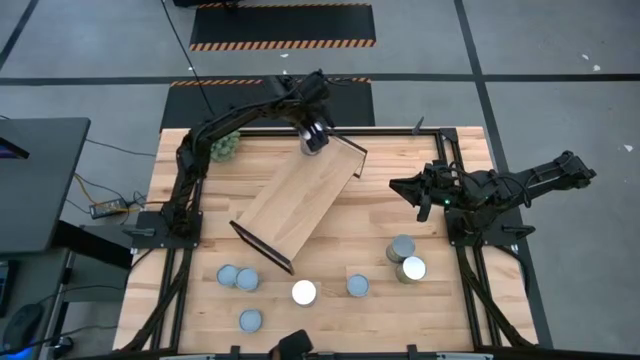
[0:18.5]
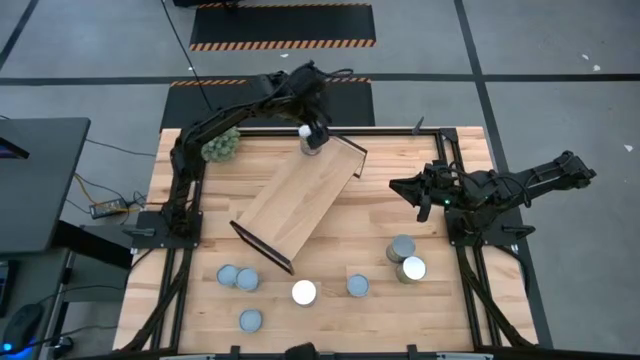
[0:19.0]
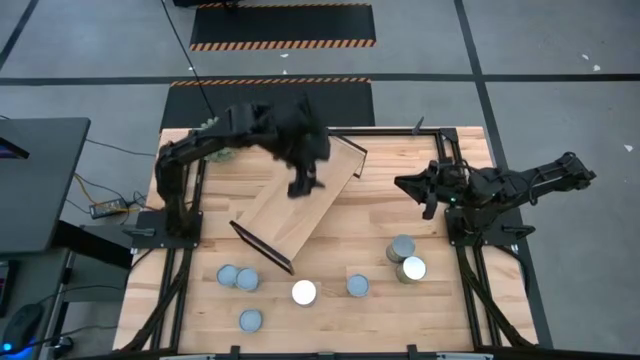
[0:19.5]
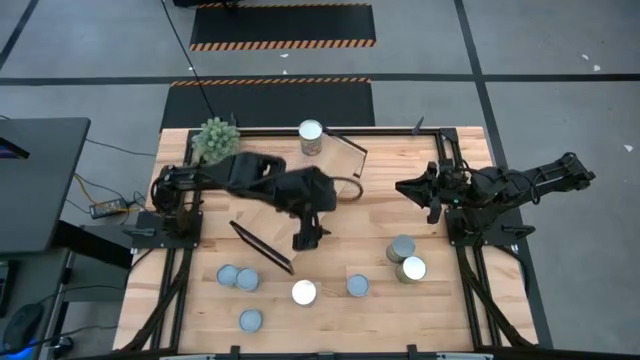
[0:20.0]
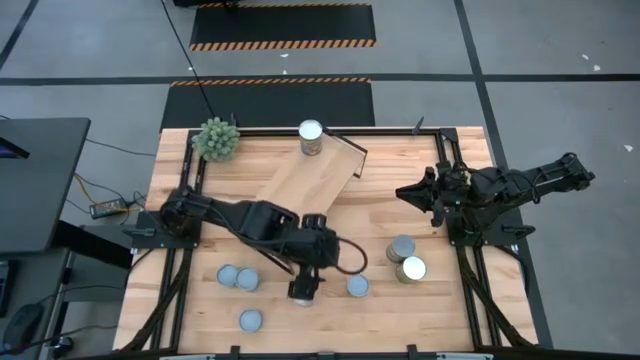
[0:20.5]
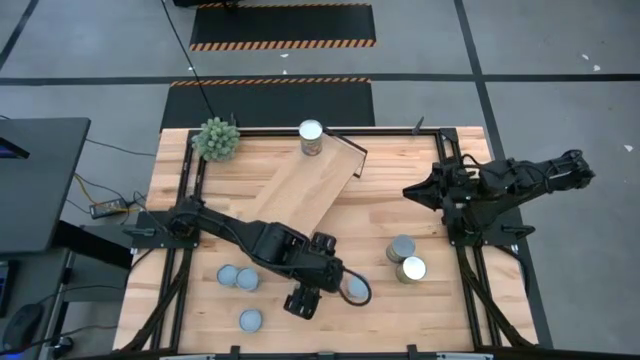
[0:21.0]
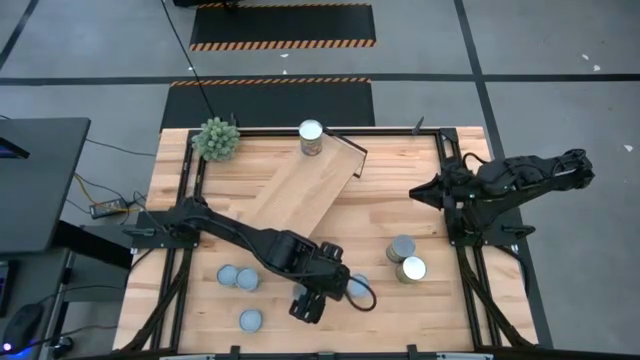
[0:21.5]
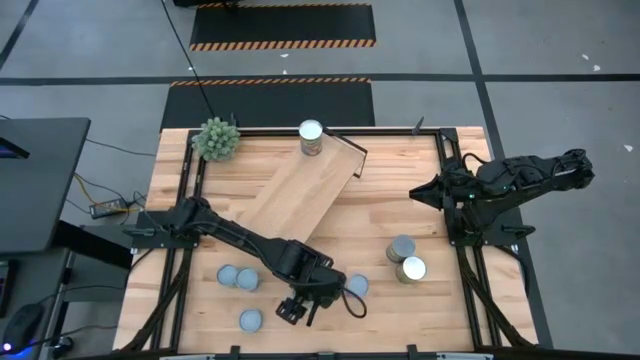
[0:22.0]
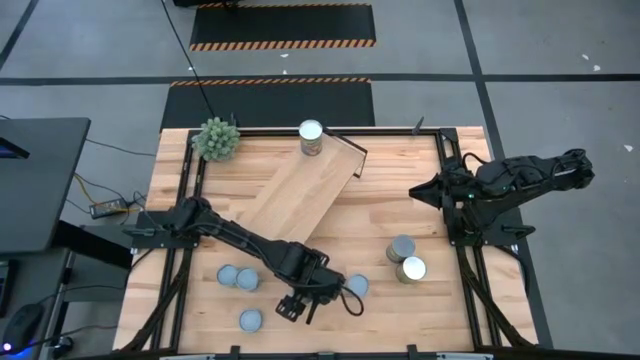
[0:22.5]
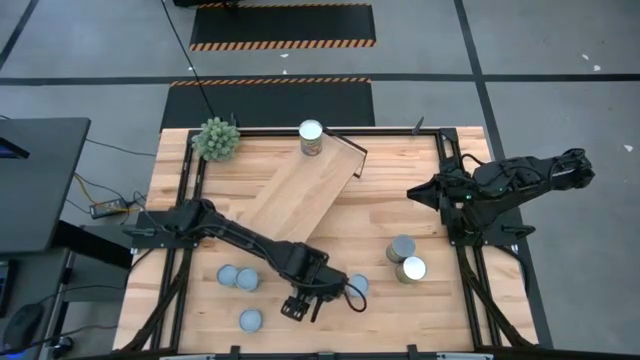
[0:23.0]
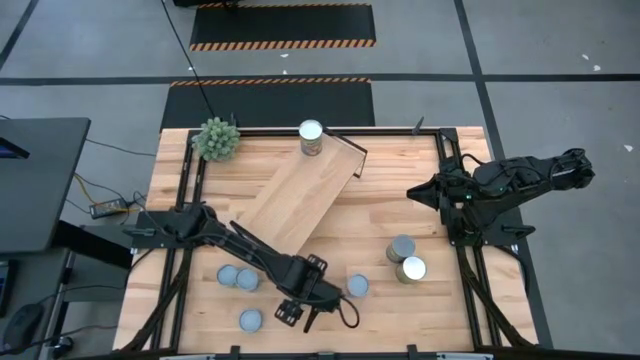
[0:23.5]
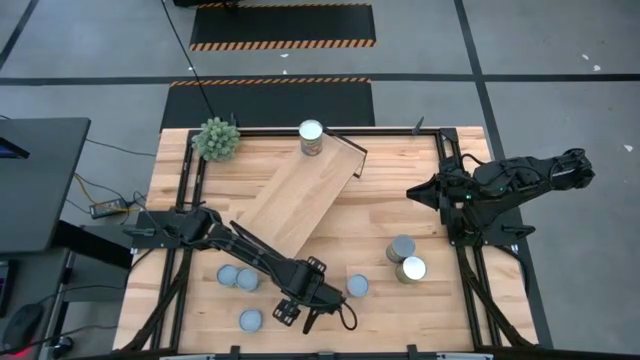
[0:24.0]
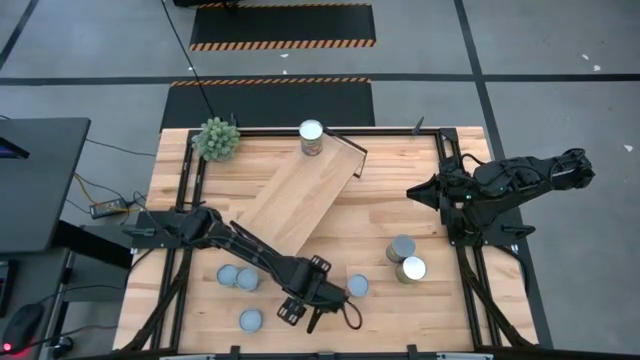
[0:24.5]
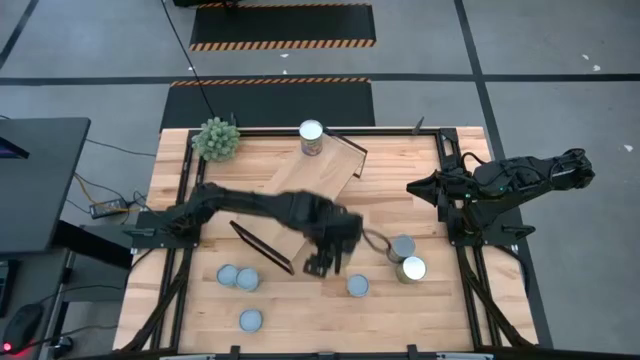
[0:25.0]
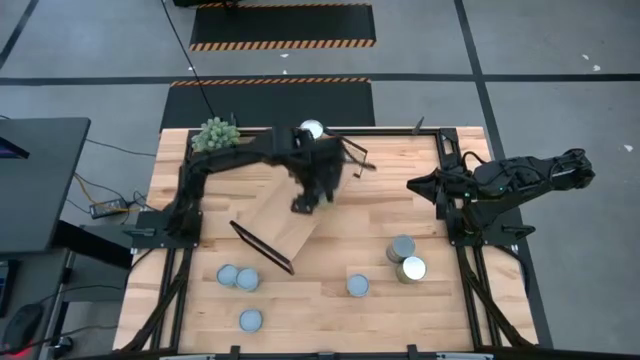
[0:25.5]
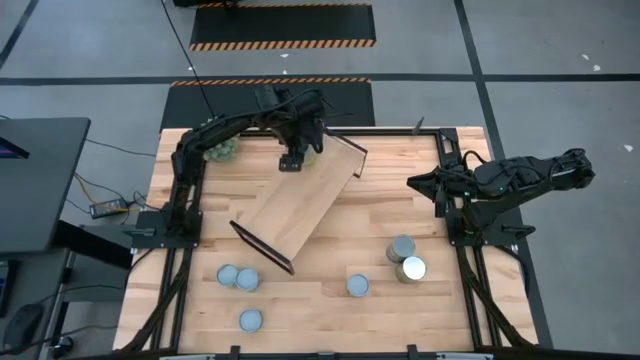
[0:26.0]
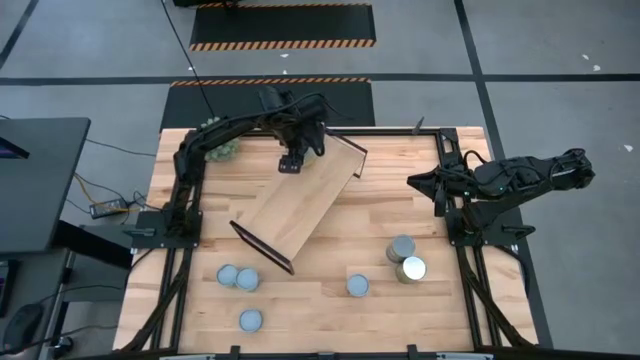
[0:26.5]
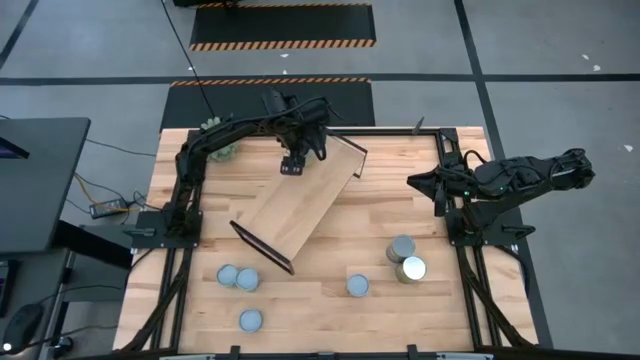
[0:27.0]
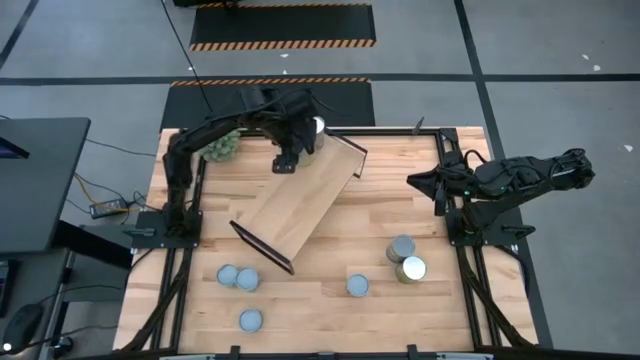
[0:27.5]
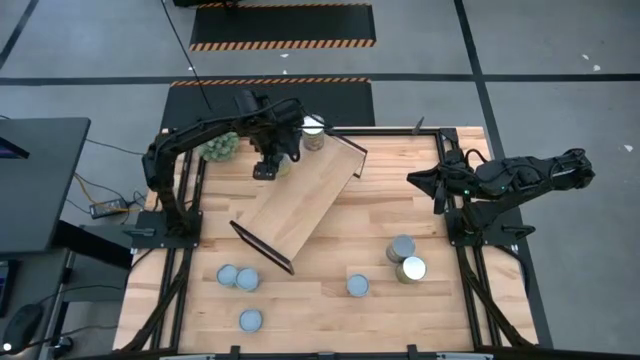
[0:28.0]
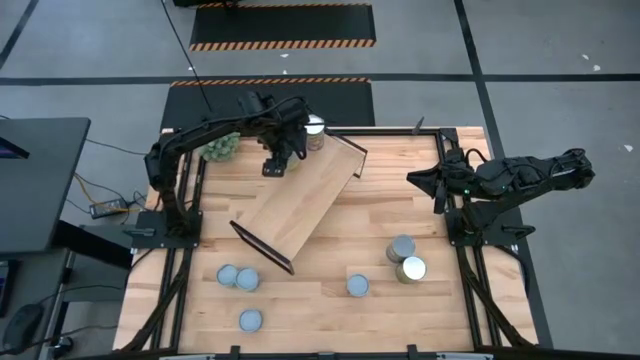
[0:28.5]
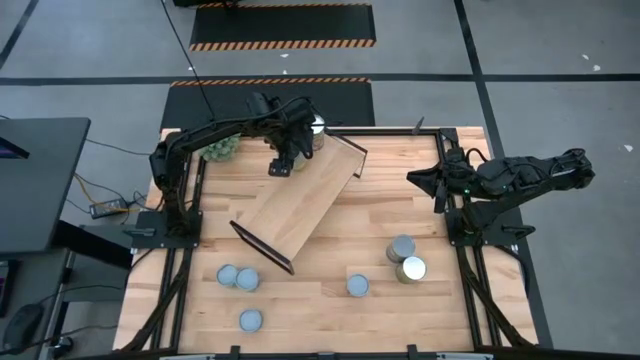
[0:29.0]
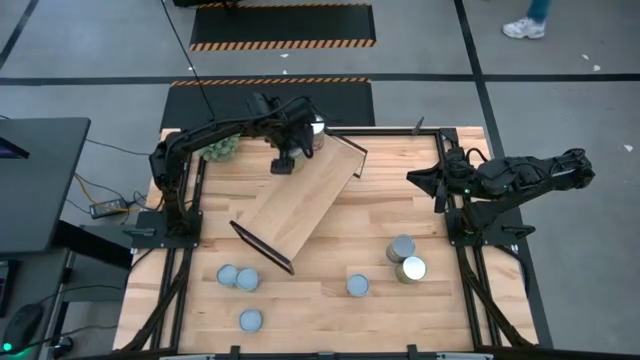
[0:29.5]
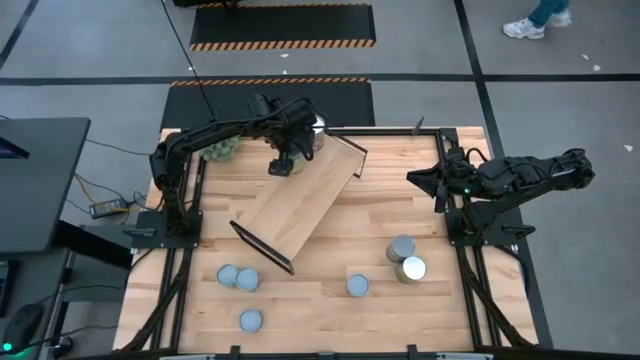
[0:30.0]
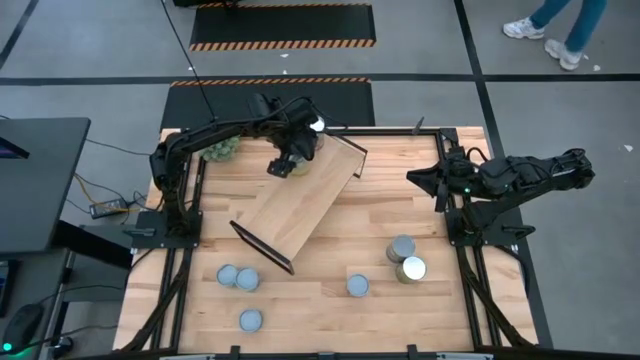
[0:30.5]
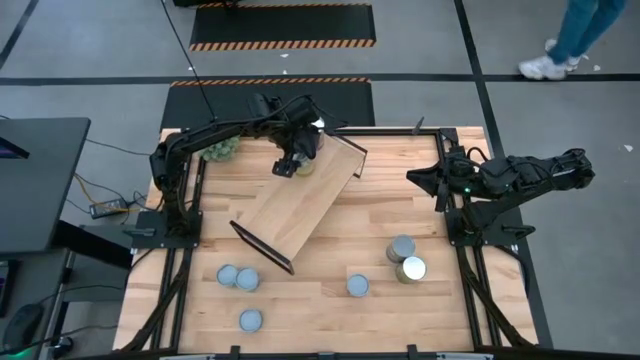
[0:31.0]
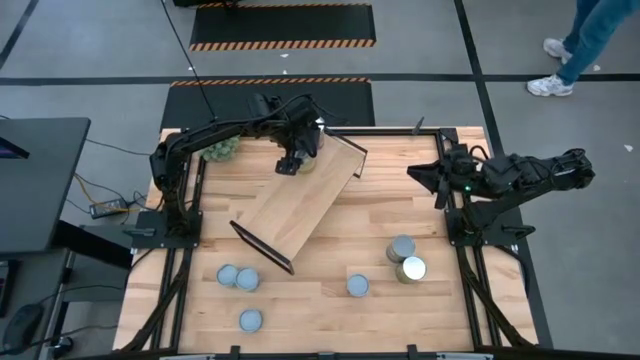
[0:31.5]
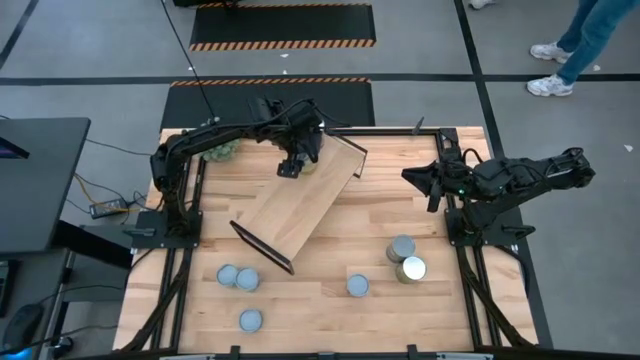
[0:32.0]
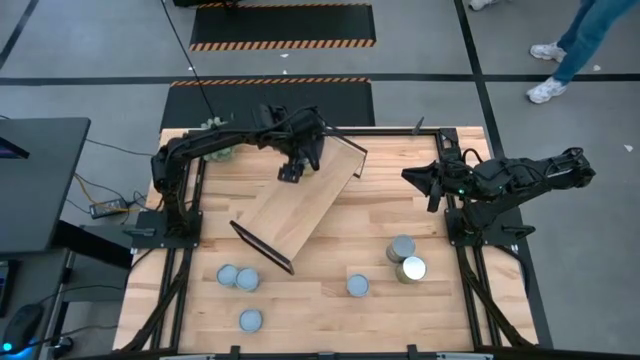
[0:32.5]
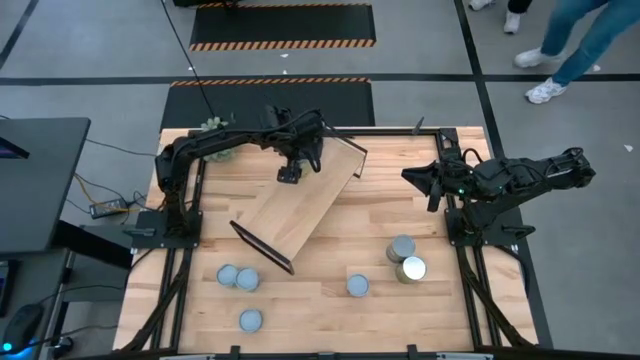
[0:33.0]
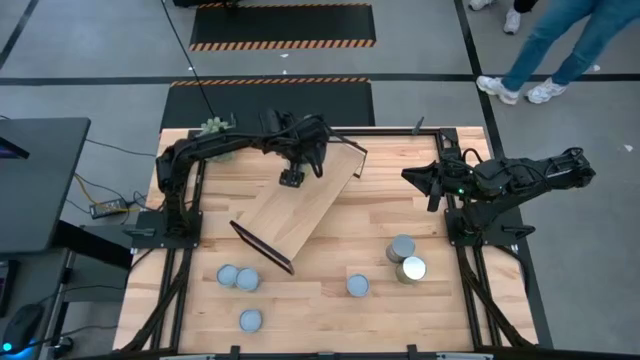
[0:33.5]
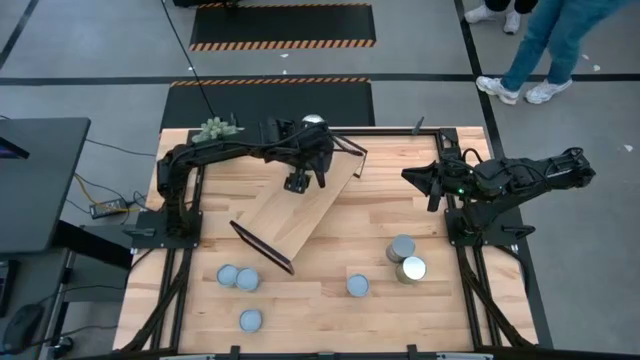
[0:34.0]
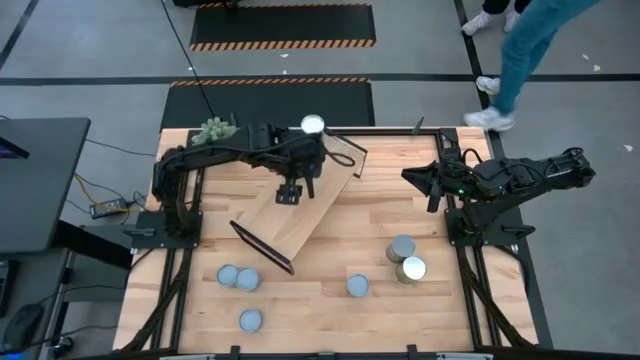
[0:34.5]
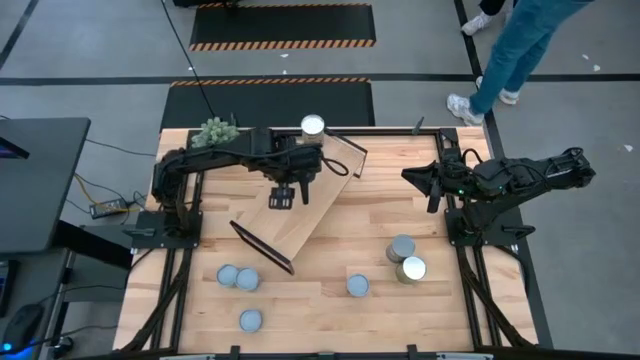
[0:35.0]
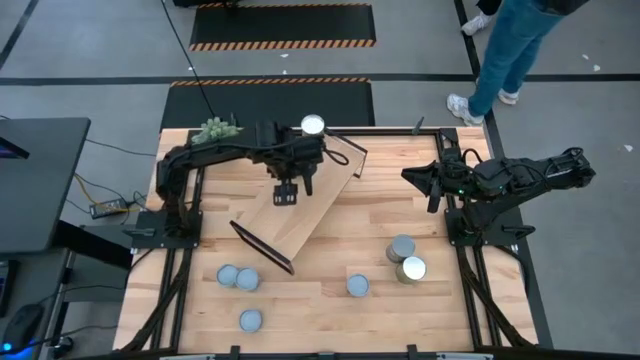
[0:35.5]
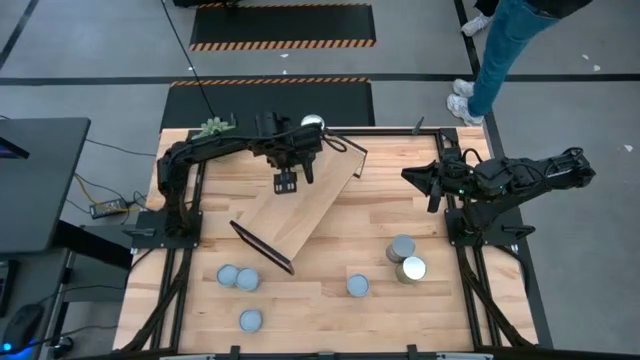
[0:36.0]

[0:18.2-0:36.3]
Task: Pick and place cans onto a shelf
Put the canned carrots on the shelf

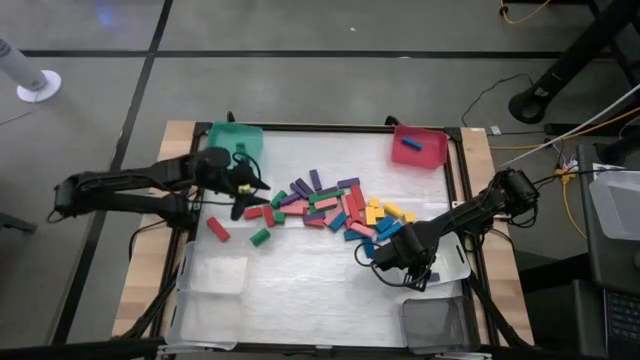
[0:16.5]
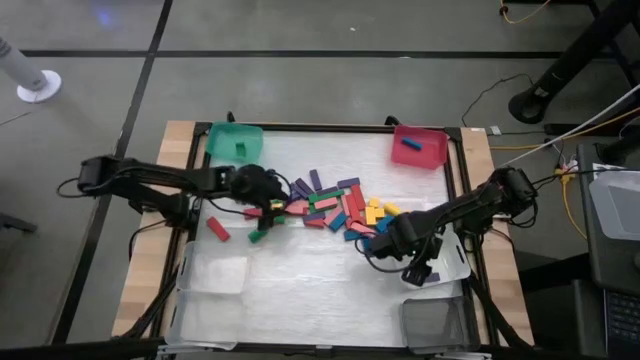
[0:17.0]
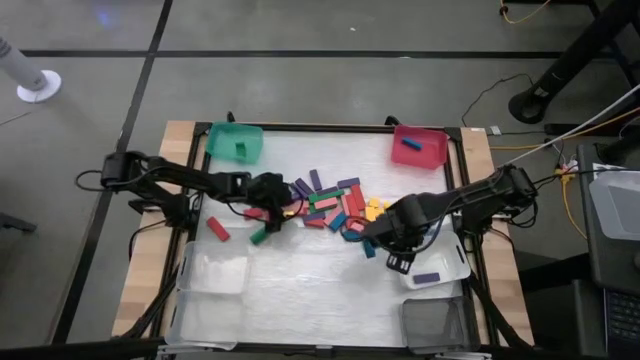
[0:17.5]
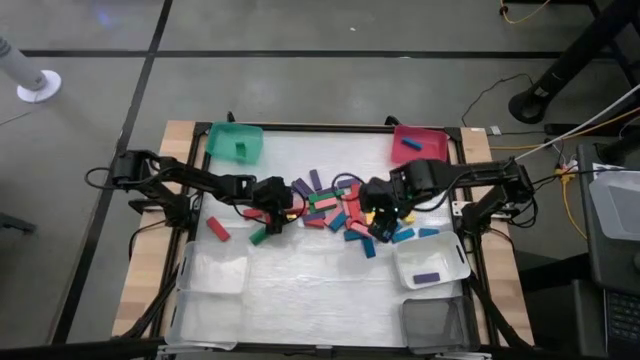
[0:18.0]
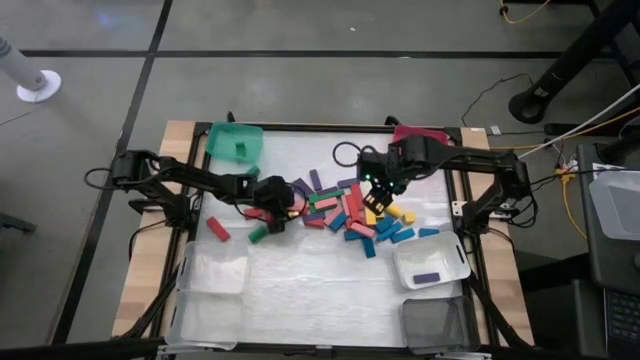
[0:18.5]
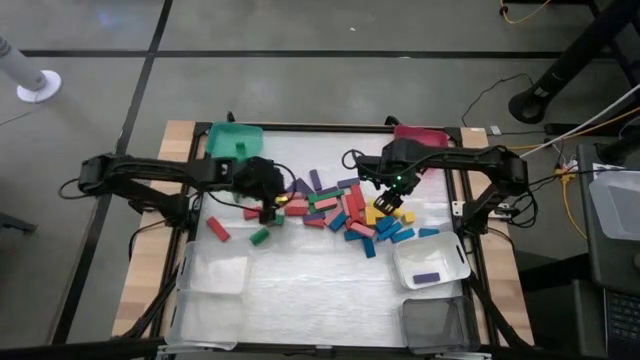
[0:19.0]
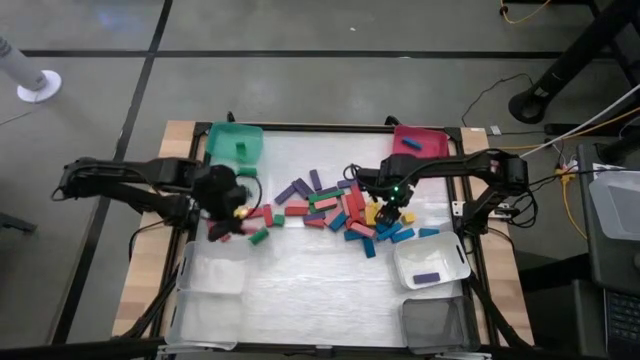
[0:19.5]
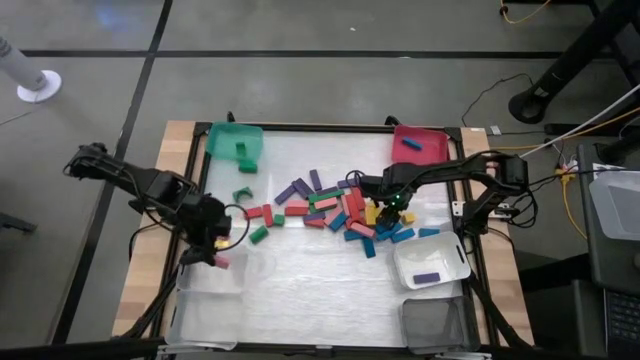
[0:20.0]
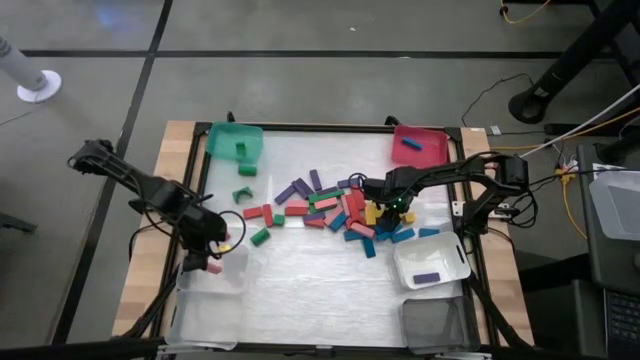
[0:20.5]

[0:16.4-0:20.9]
Task: Sort blocks
Put the pink block into the top transparent bin
